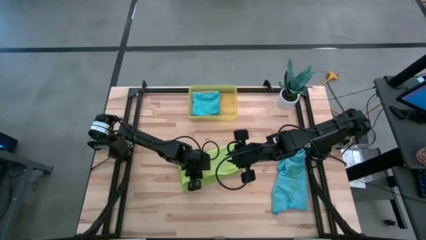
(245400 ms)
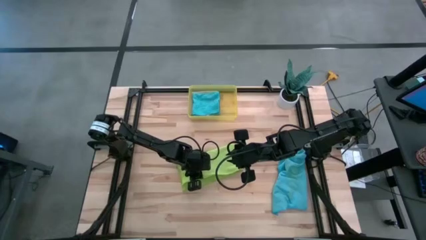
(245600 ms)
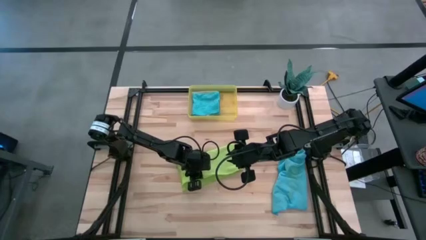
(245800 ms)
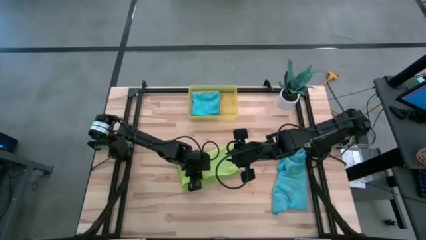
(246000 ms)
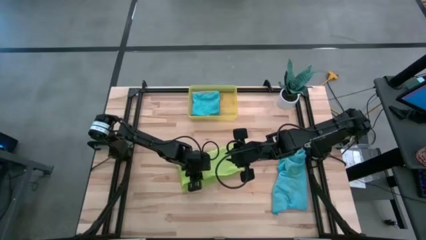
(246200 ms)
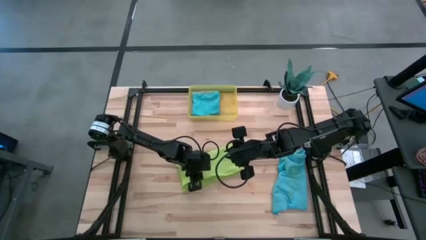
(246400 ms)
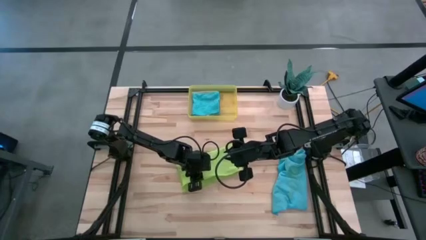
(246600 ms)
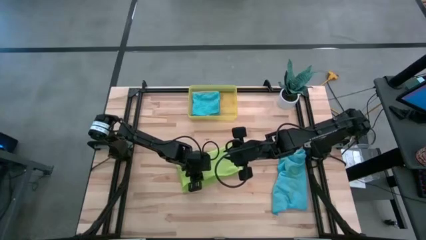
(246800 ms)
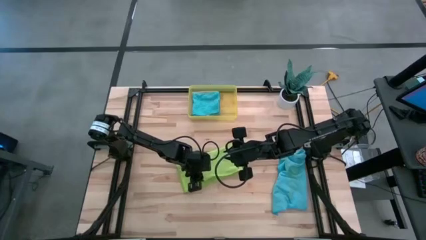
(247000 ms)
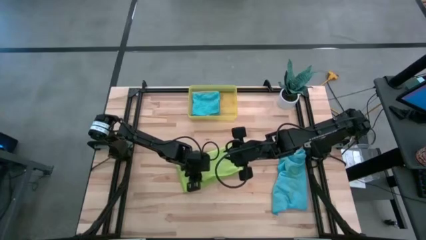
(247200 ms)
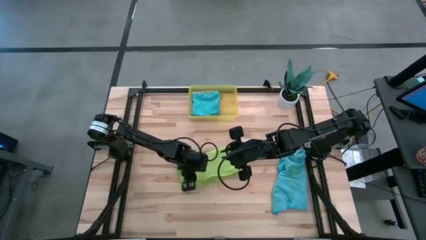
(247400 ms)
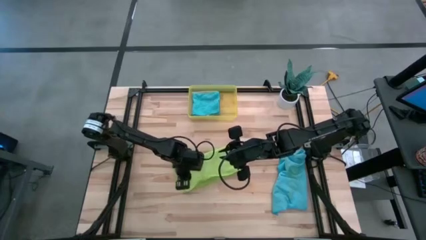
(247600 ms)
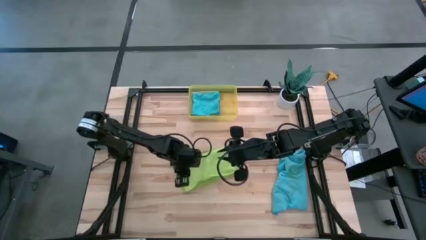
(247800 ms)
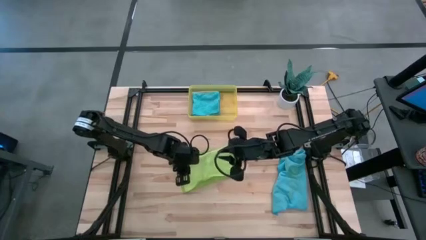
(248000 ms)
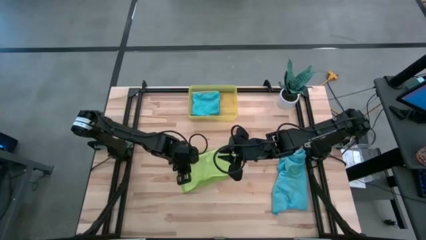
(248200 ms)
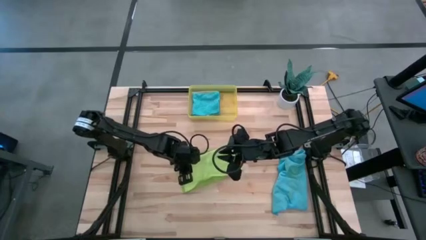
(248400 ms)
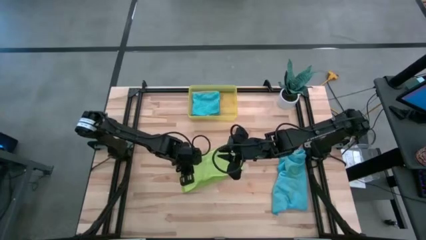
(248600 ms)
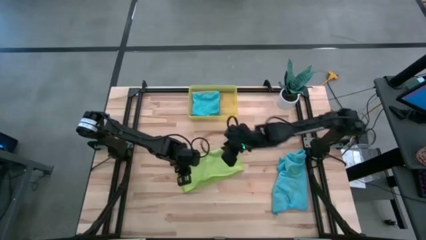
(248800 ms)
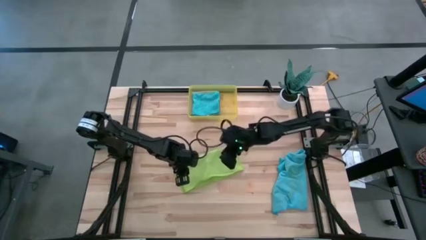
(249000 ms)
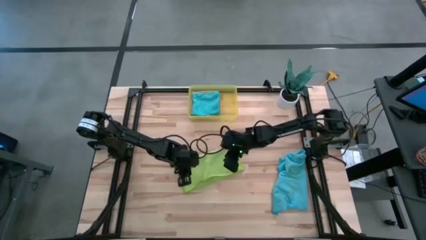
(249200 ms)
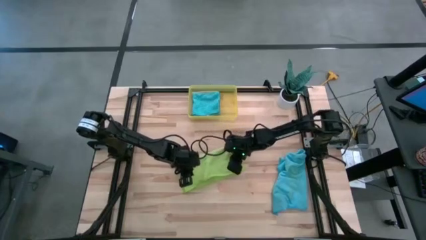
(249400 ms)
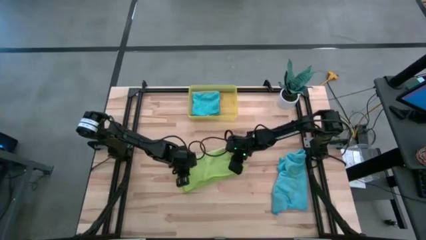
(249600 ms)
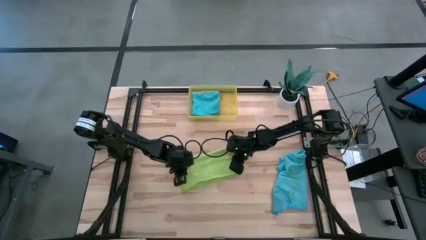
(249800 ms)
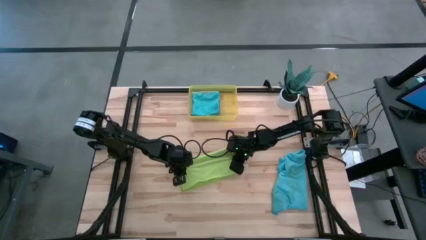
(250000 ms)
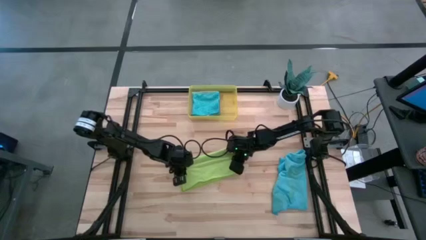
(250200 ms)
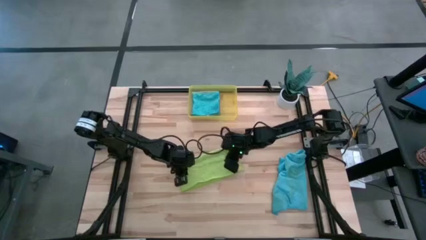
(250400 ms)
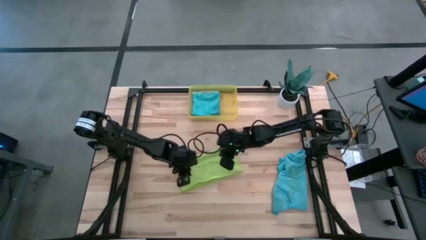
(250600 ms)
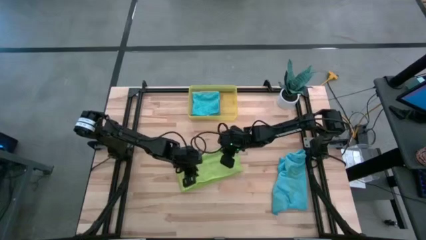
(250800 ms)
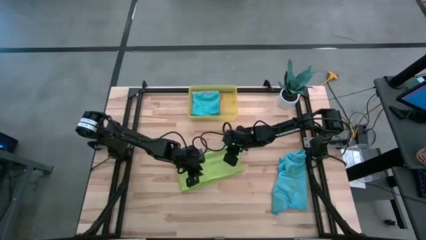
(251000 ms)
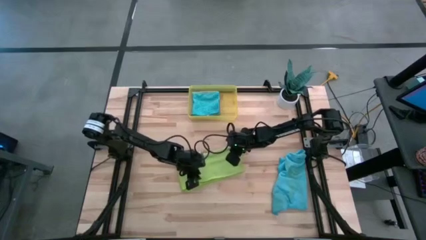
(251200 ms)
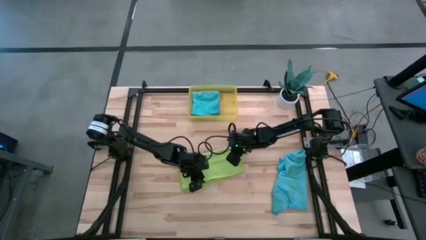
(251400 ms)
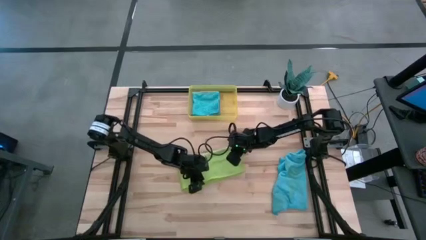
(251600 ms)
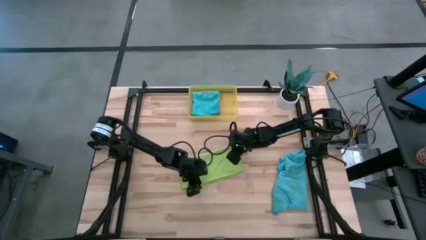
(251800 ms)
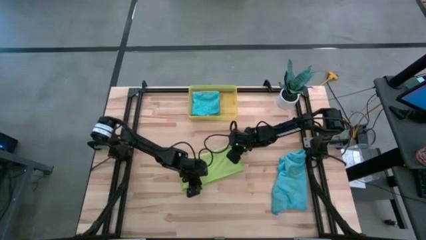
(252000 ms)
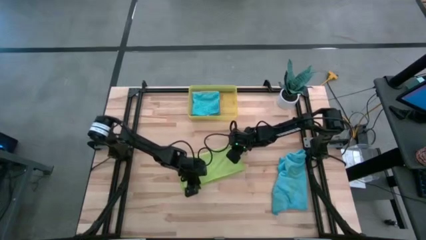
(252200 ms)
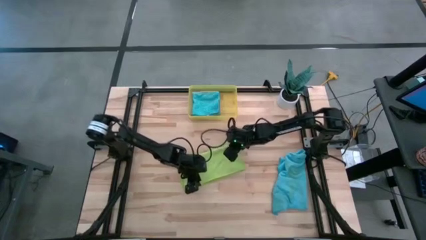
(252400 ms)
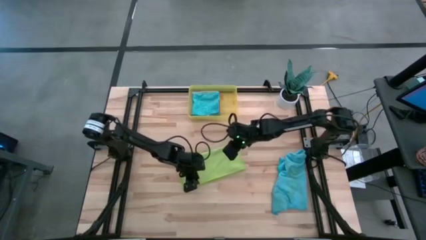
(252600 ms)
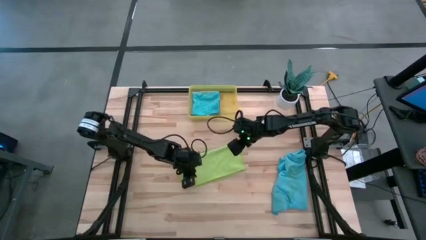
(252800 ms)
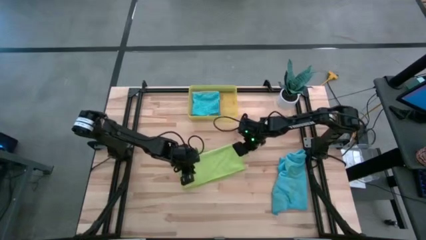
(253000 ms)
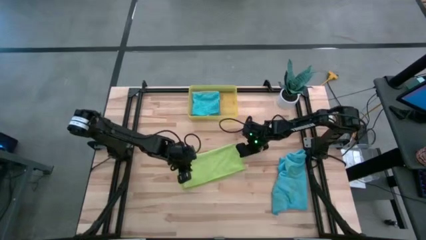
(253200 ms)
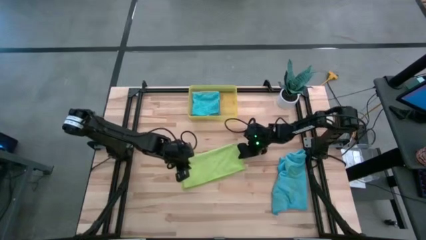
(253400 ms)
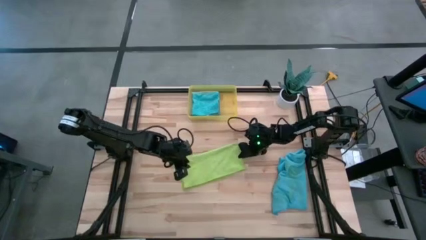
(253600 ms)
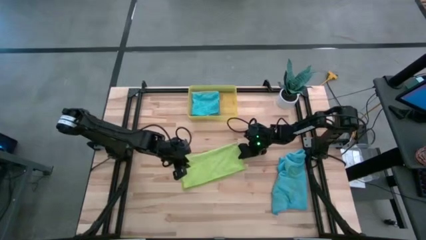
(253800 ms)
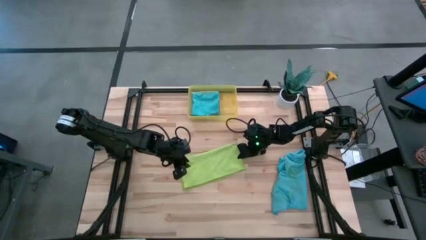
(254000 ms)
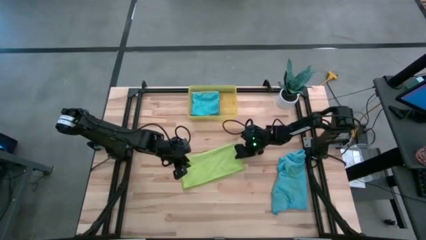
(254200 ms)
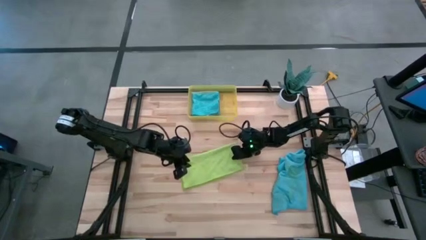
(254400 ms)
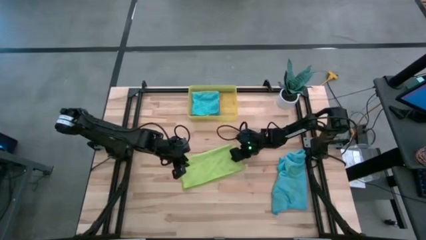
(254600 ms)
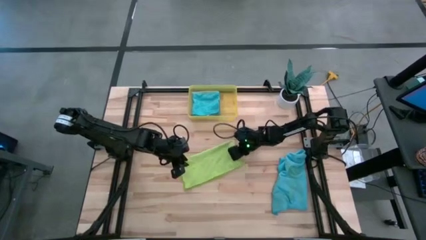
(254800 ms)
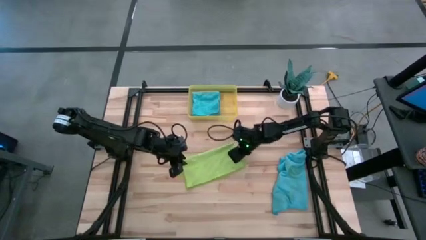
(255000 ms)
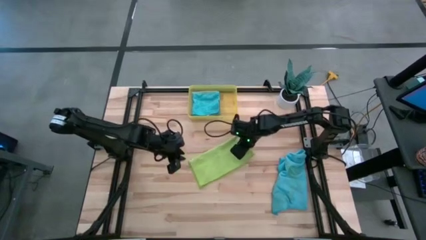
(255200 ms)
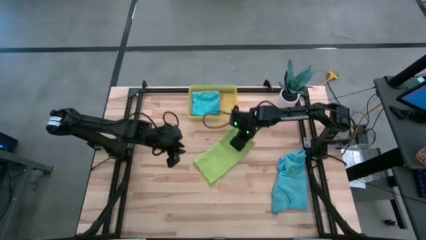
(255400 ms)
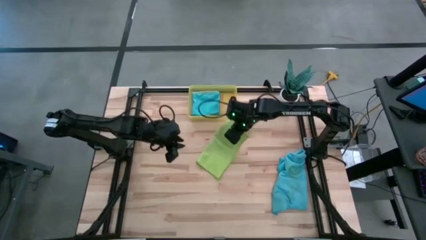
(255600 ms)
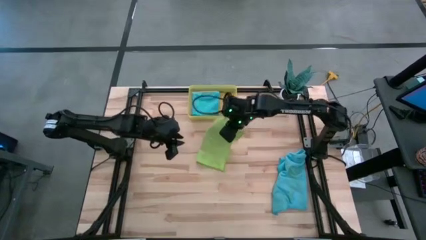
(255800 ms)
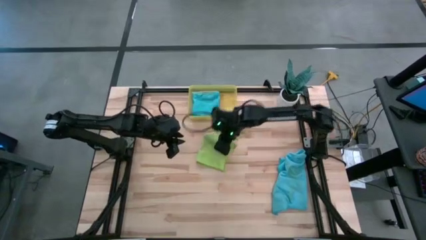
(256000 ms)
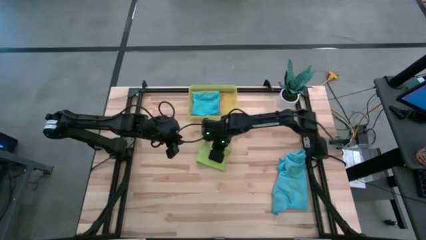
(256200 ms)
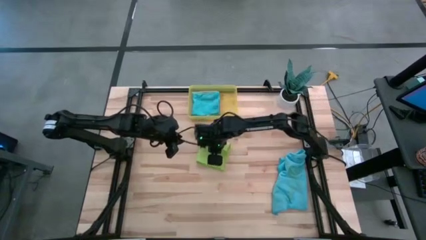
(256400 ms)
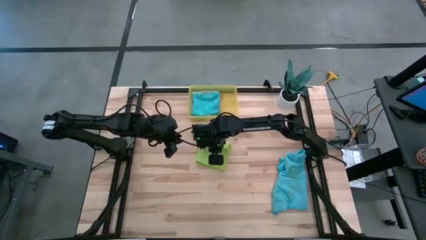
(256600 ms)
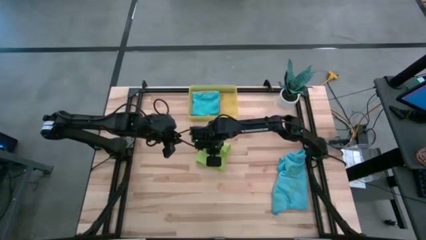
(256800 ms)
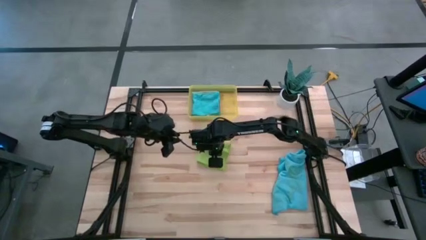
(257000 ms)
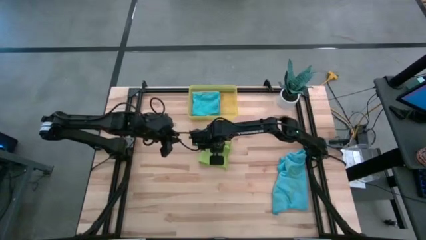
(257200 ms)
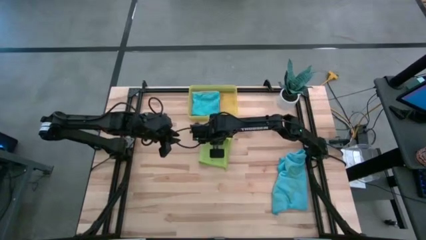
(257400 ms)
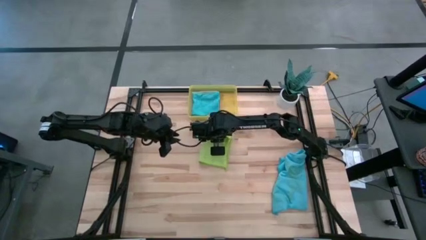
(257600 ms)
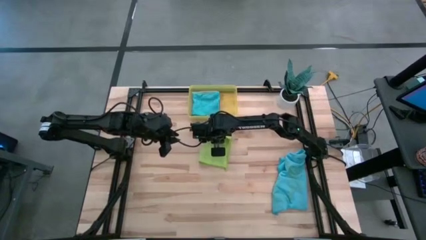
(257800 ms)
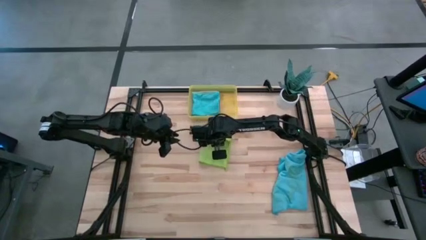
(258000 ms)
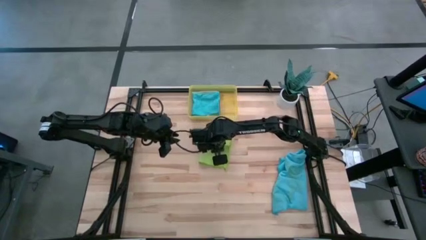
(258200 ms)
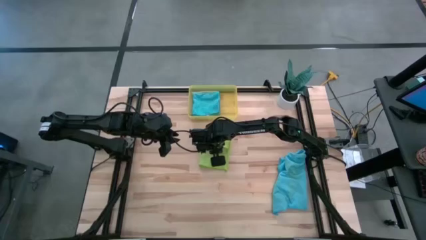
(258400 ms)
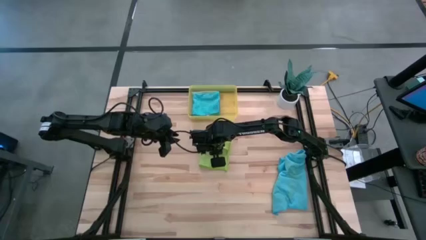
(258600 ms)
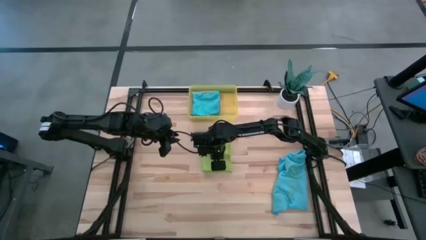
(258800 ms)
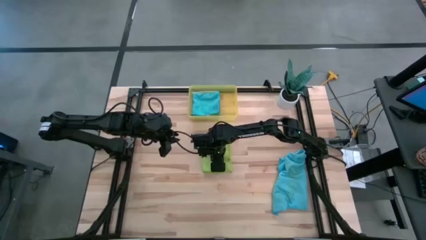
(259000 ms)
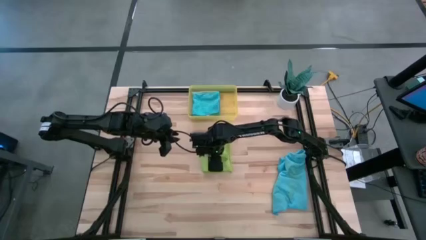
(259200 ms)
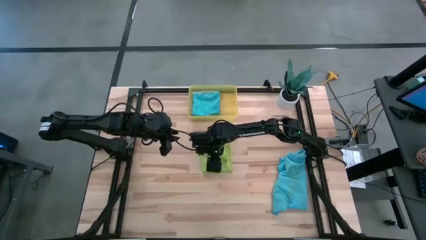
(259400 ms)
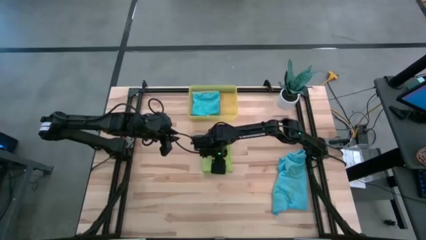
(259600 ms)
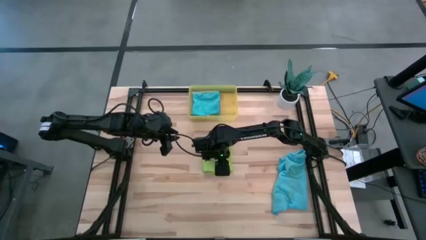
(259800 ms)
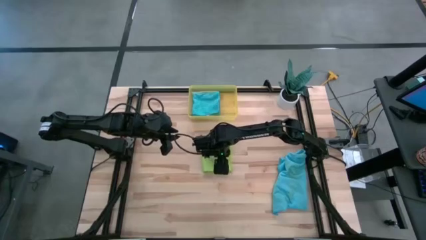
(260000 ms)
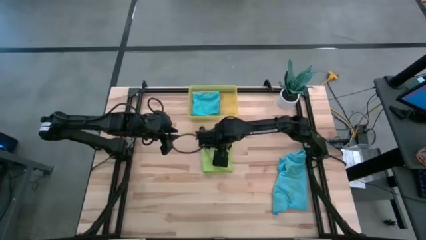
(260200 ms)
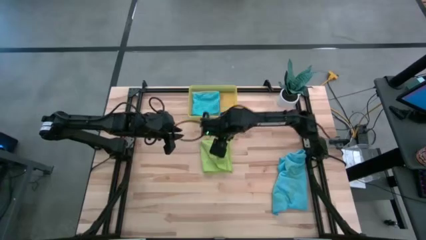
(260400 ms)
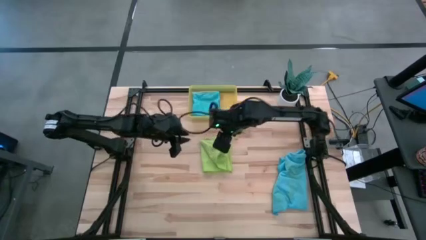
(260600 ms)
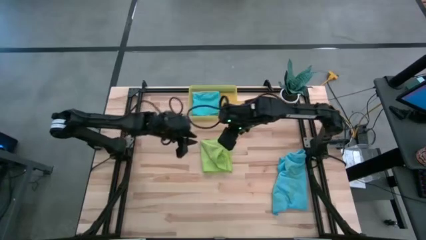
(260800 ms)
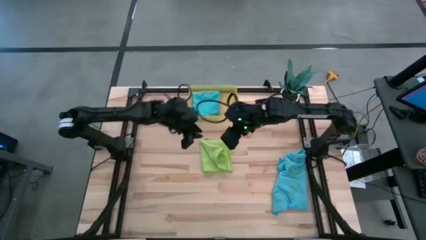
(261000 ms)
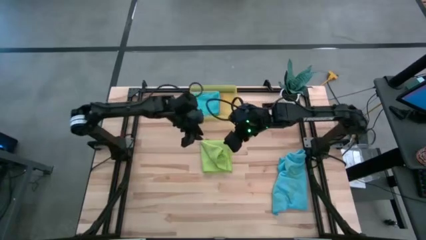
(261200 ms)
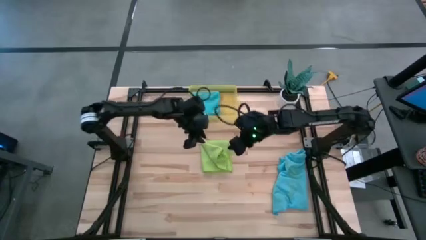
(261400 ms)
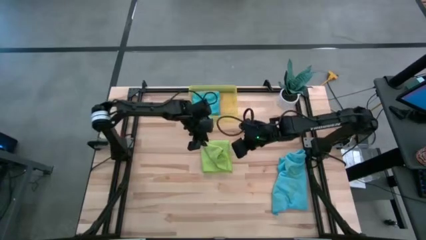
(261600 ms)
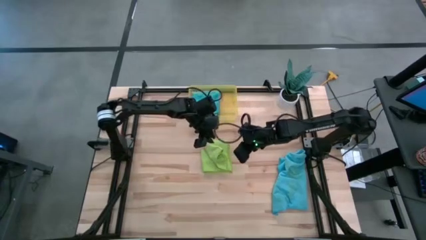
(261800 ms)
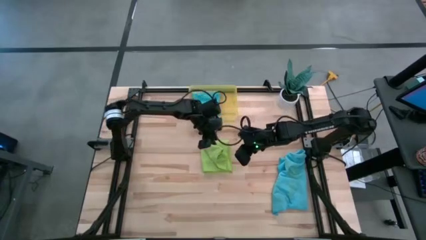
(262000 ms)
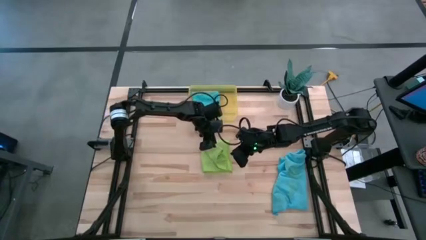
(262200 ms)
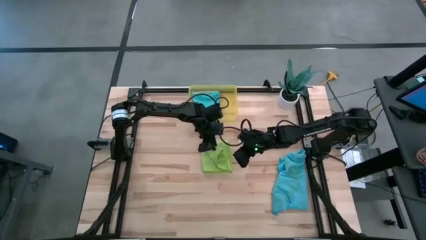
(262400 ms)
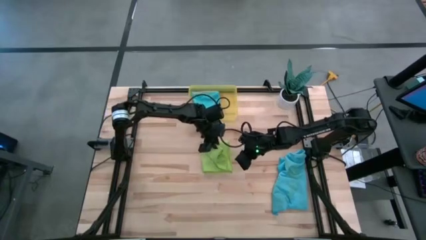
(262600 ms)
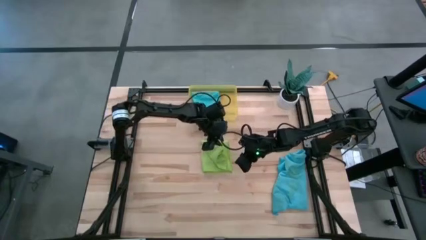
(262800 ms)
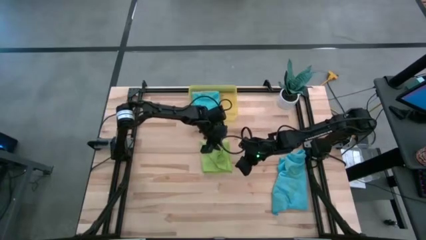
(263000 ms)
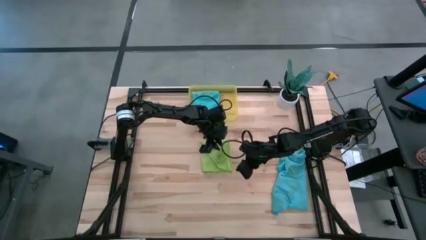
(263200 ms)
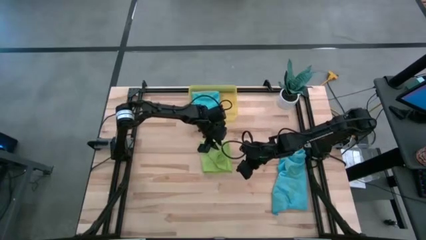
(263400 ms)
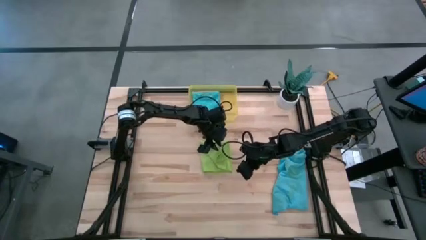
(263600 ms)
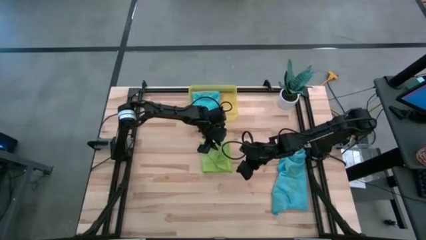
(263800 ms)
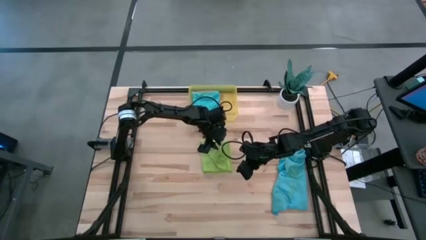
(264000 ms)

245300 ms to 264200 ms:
Task: Fold microfiber towels
Fold the green microfiber cloth
